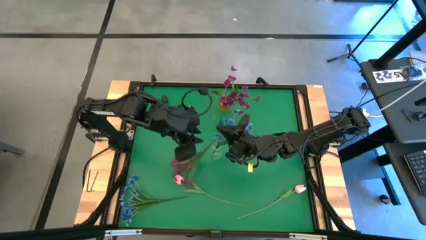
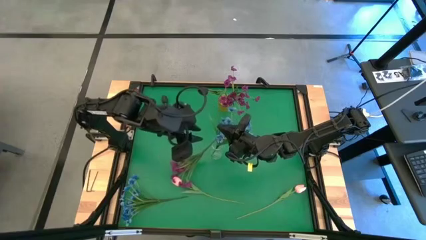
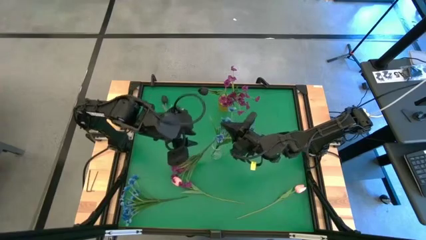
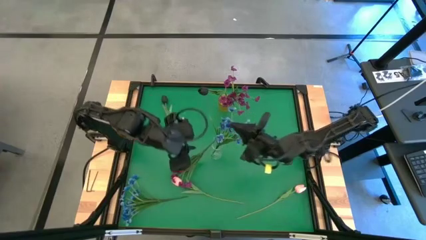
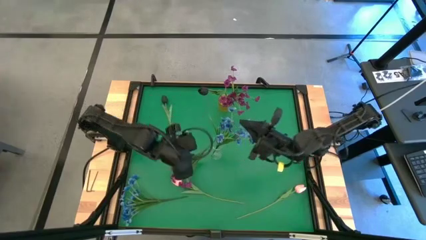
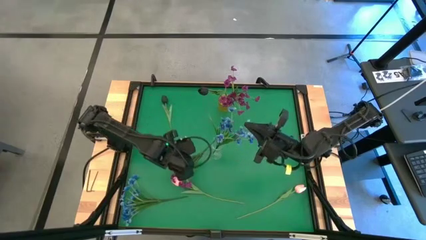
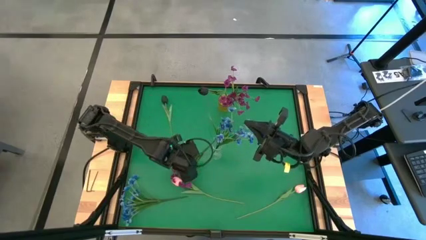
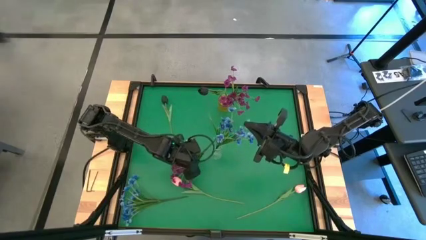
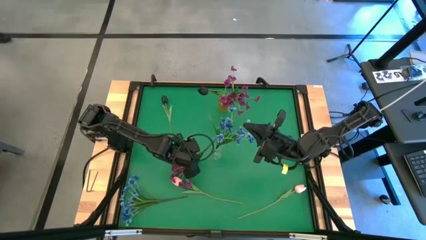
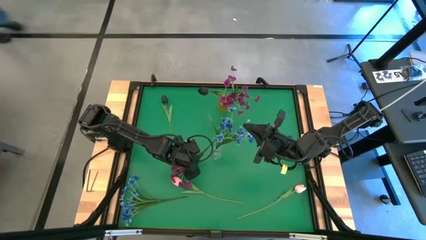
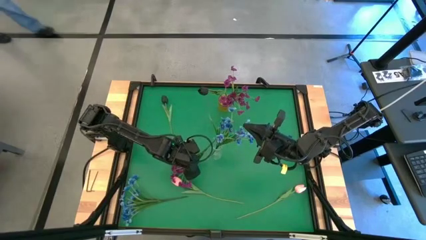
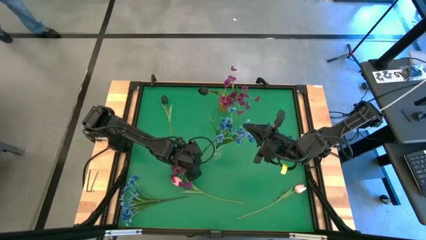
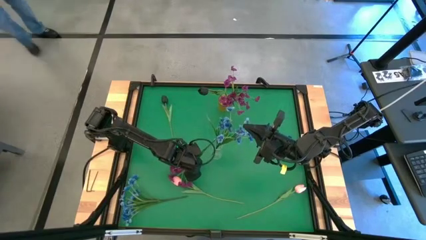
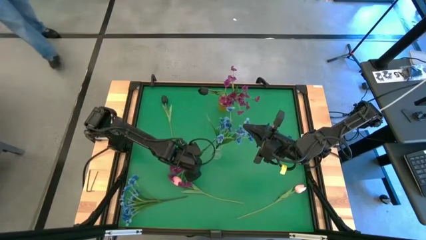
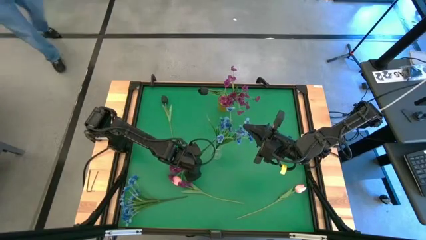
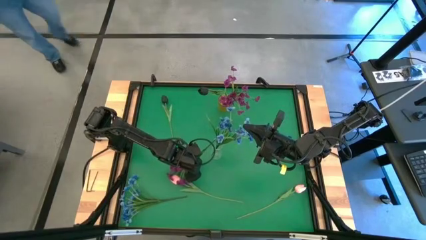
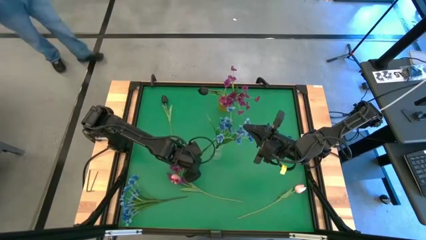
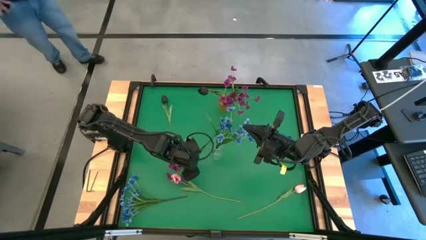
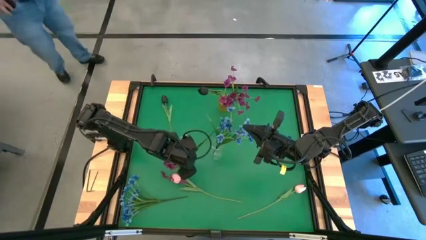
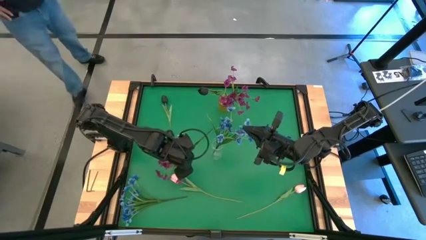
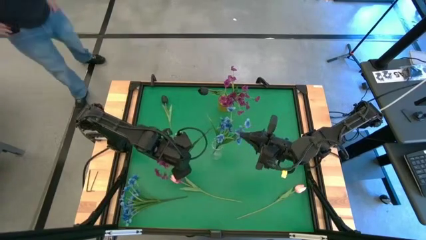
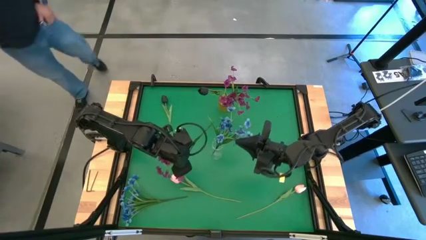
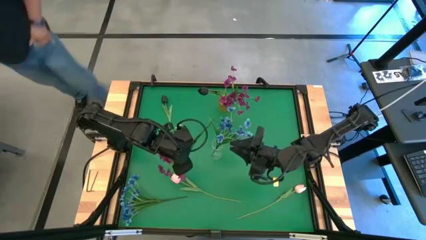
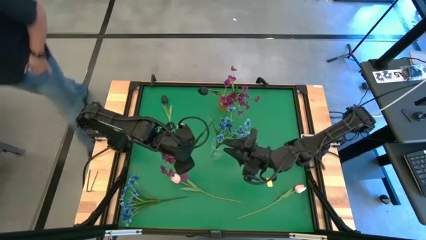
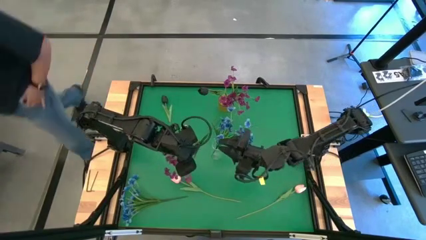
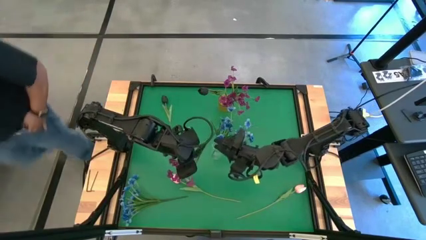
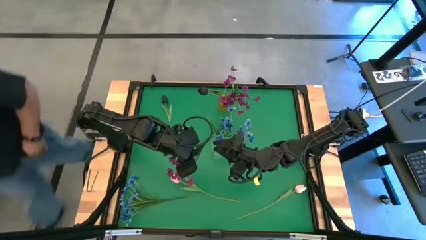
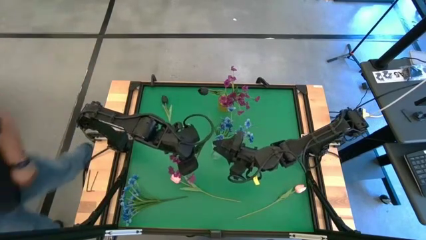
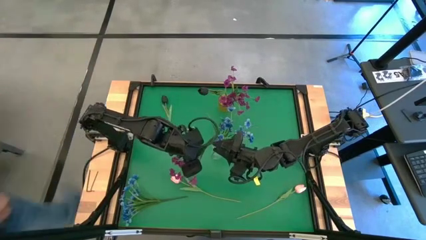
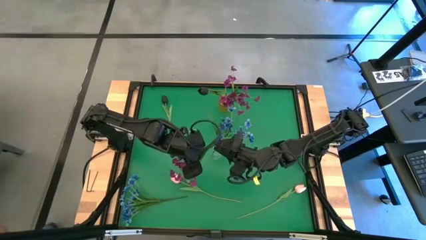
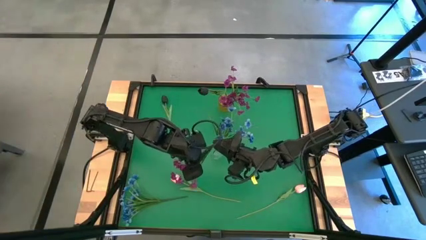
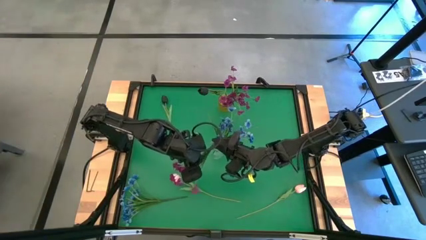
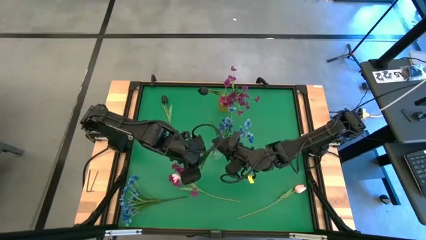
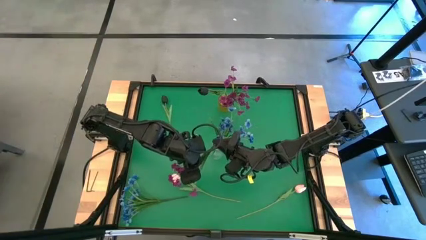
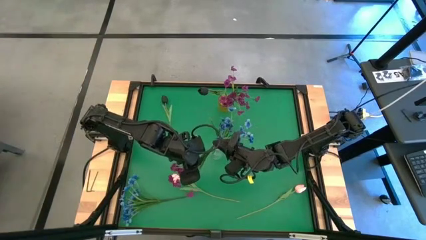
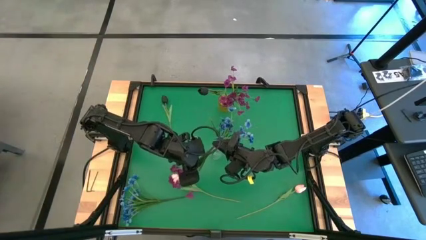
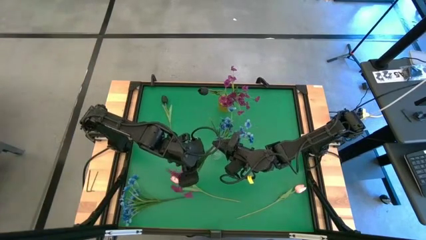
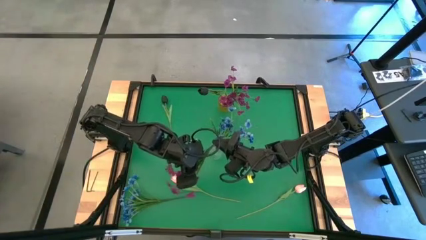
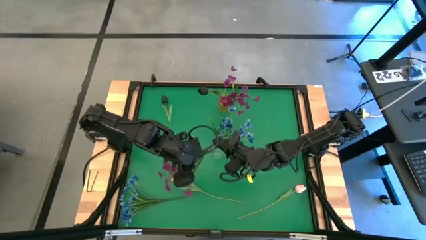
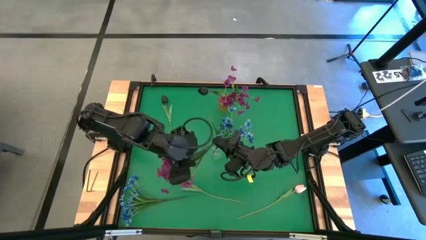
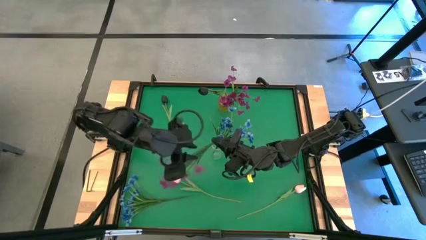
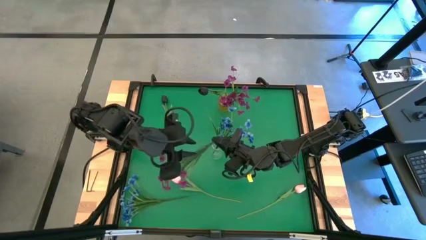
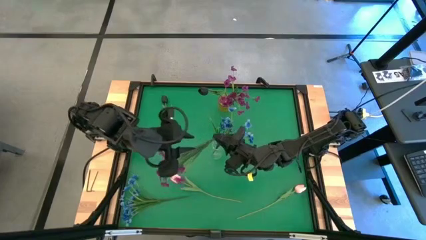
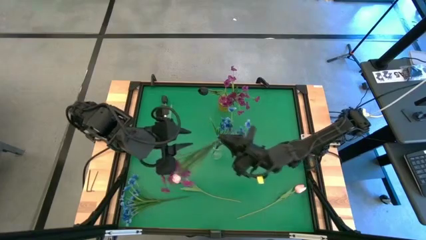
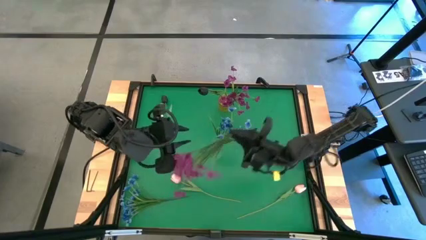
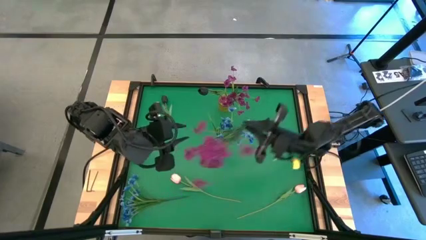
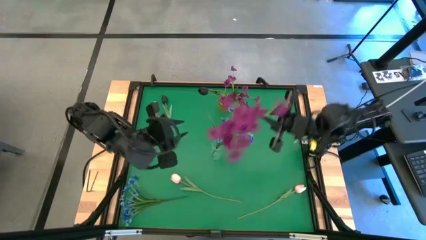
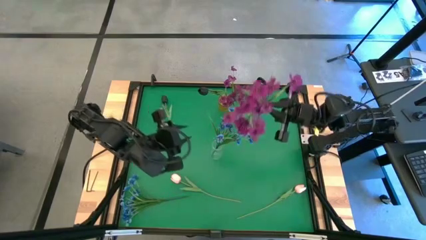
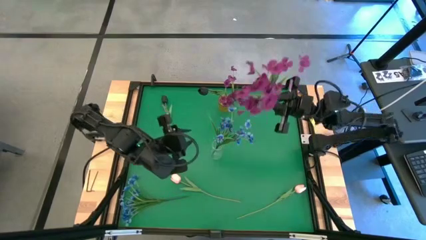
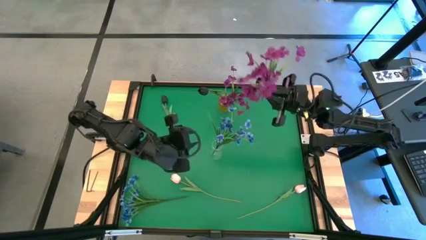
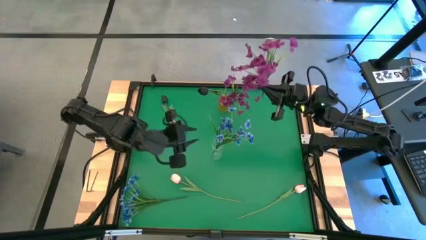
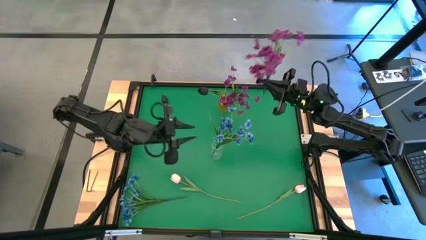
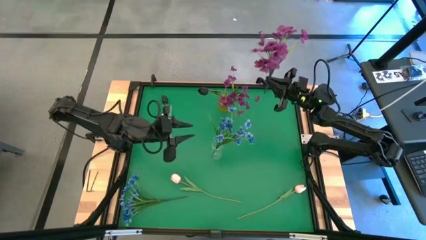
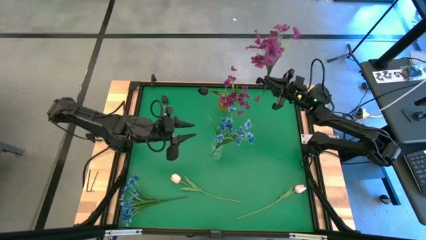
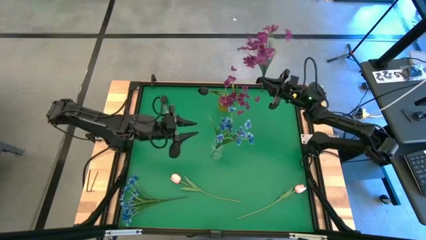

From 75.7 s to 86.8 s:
Task: Sort flowers into vase by color
Put the purple flowers into the yellow vase

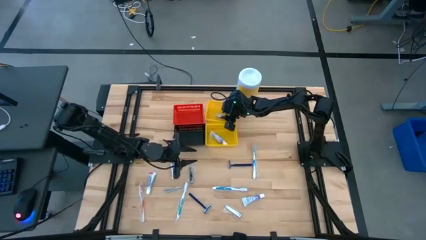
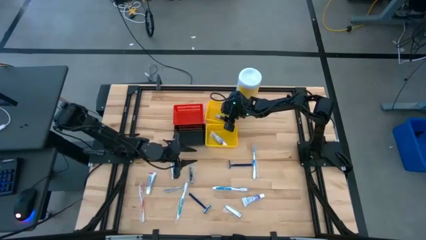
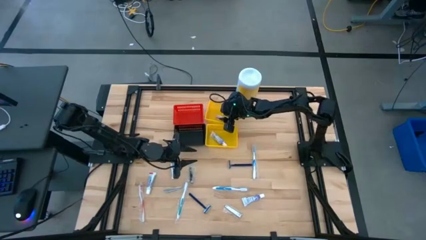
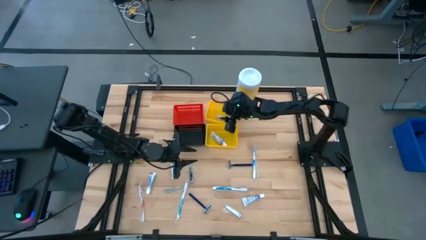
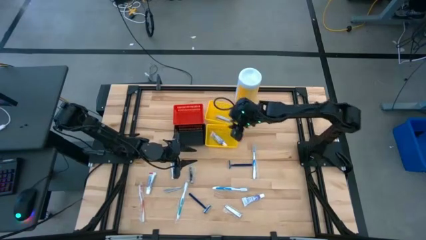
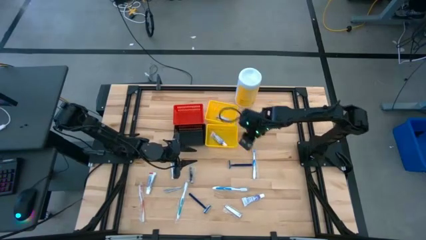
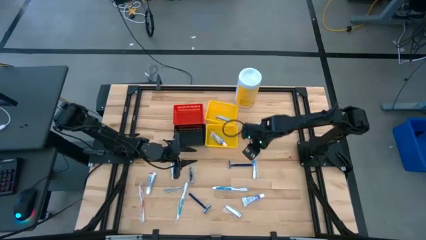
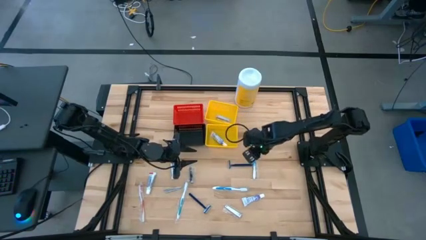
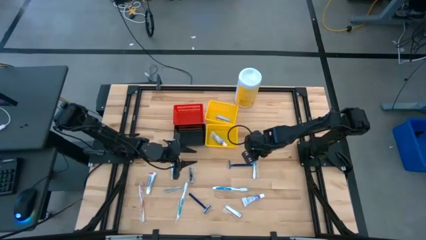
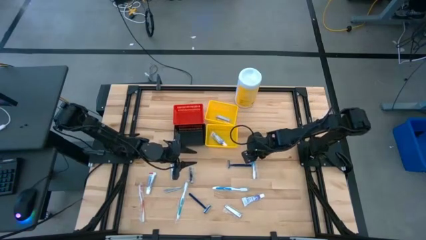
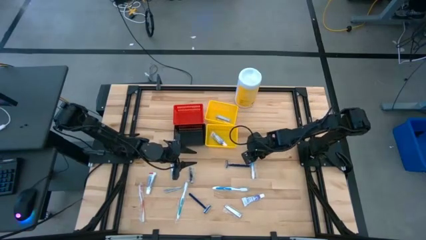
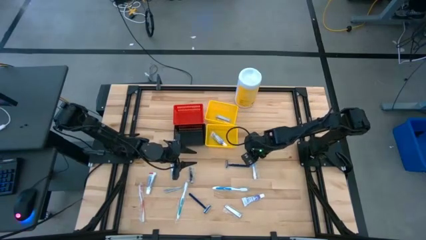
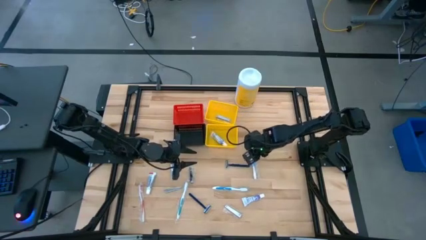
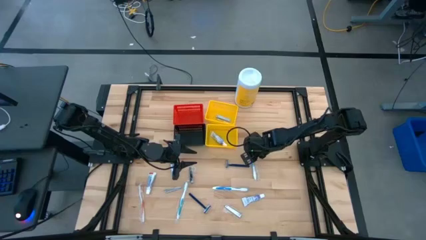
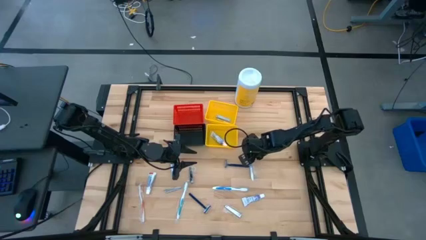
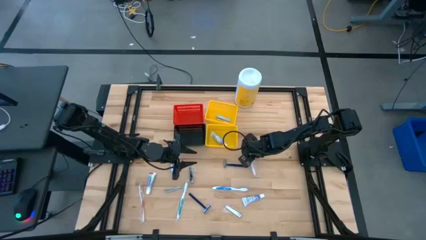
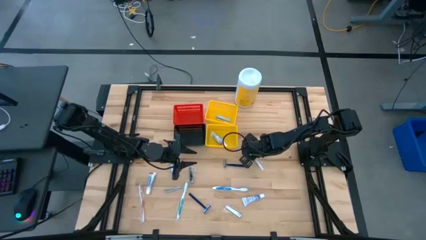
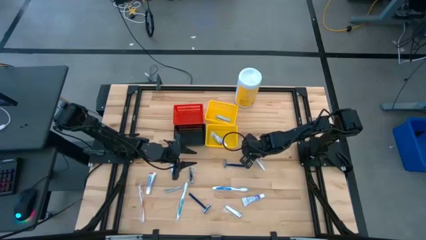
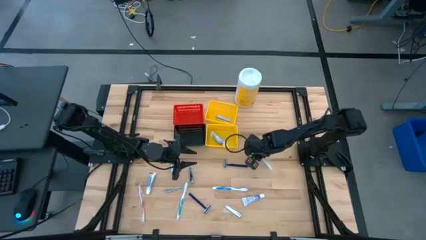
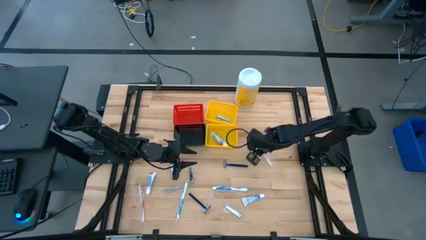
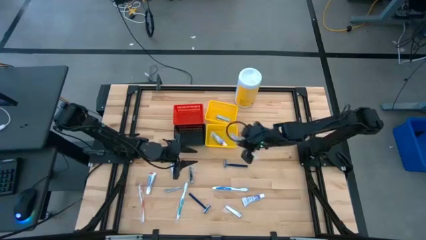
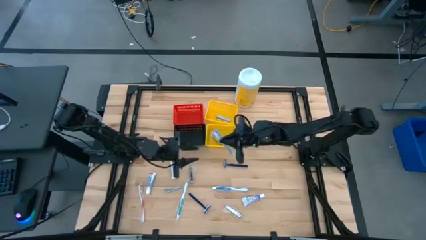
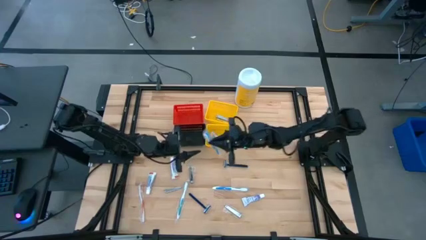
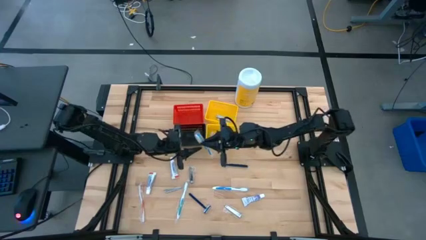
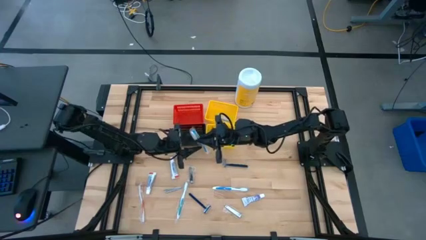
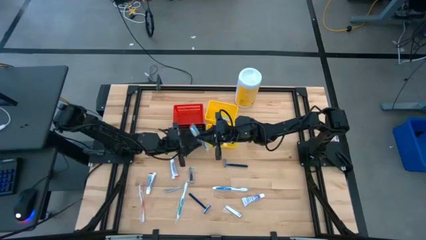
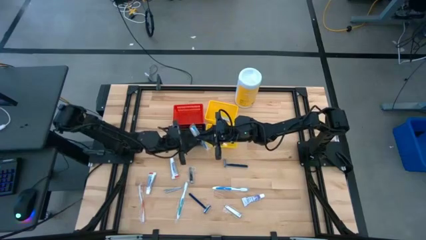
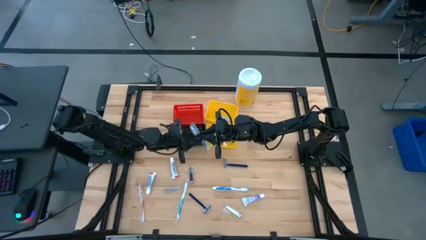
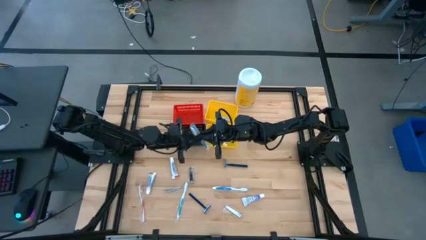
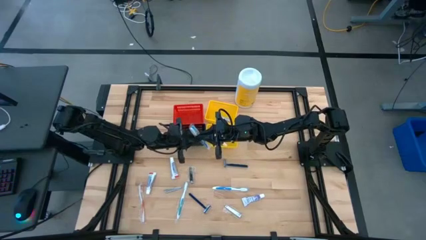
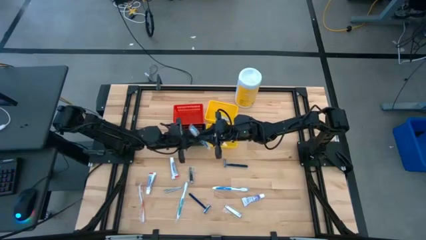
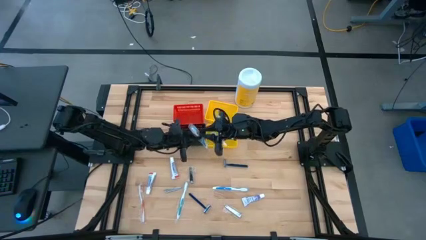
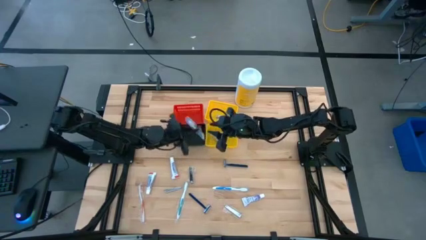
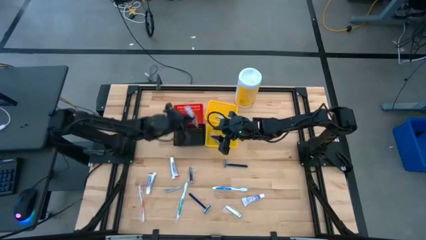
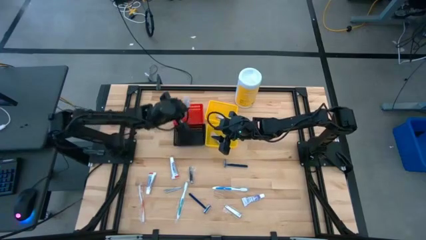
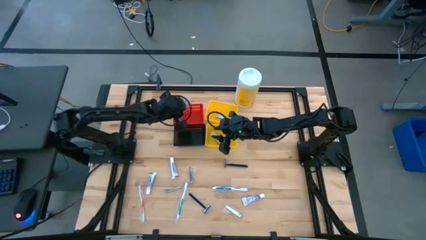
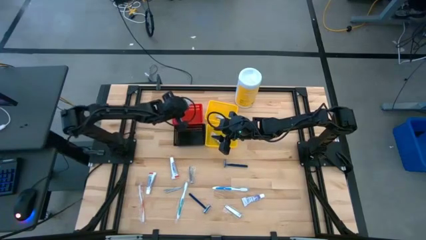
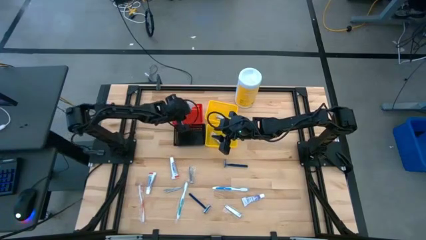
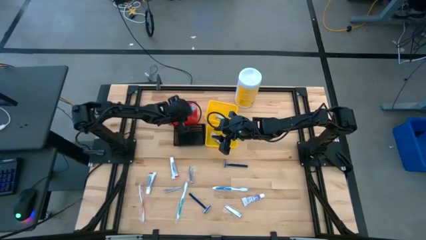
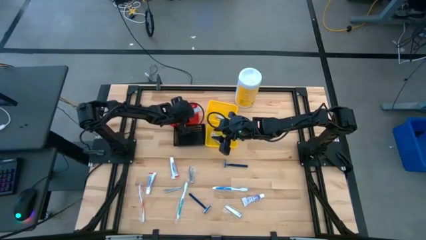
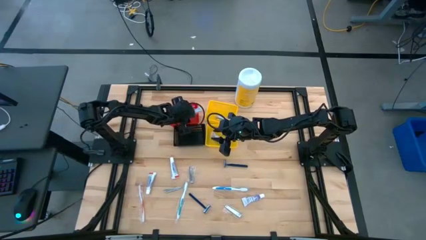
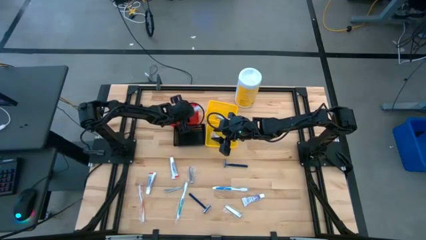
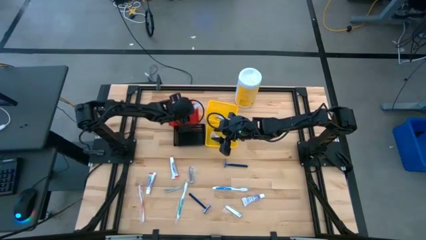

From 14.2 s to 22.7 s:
Task: Pick & Place Travel size toiletries
Put the blue toothbrush into the red bin
